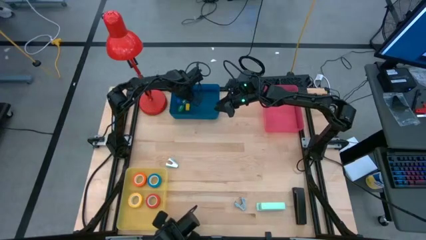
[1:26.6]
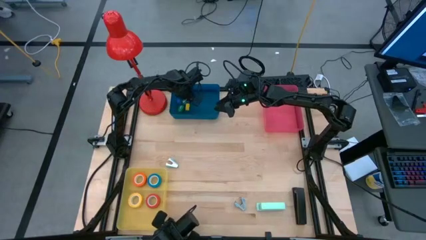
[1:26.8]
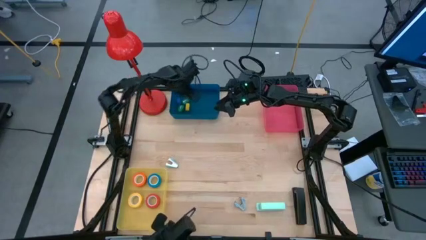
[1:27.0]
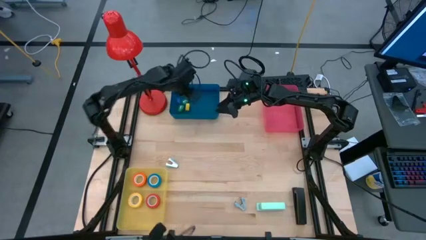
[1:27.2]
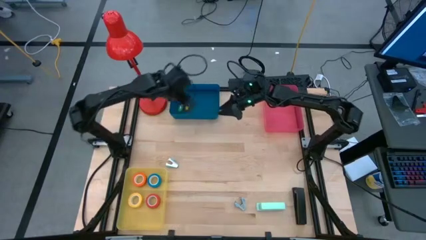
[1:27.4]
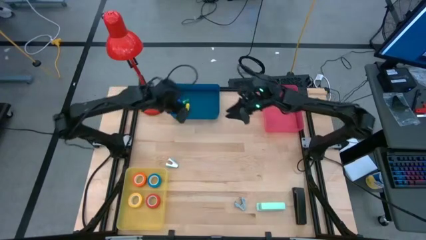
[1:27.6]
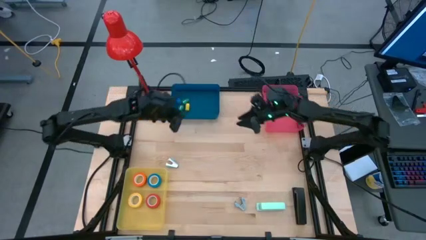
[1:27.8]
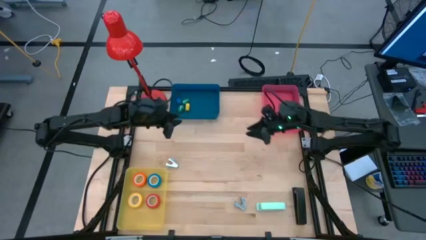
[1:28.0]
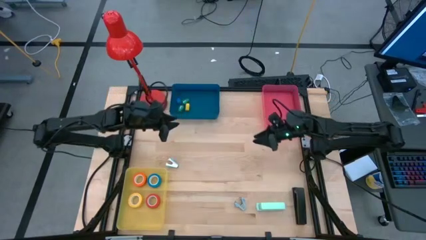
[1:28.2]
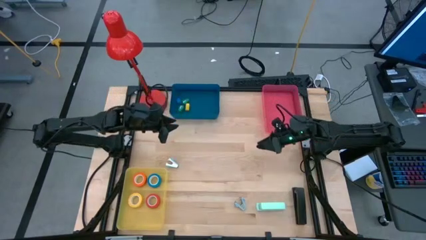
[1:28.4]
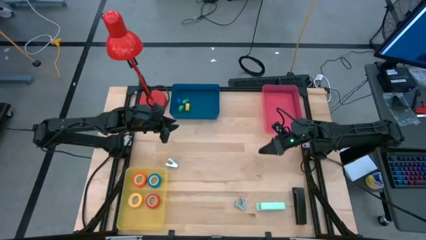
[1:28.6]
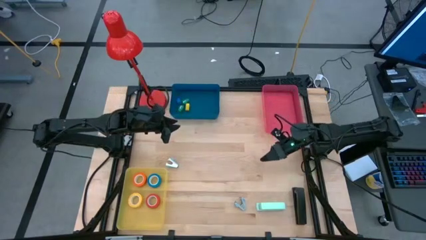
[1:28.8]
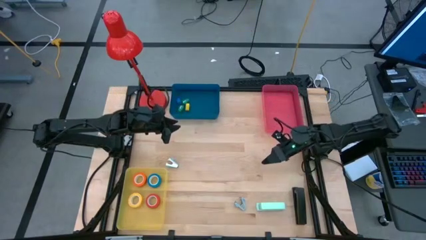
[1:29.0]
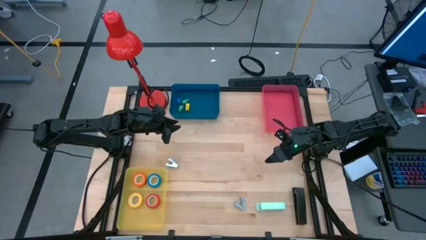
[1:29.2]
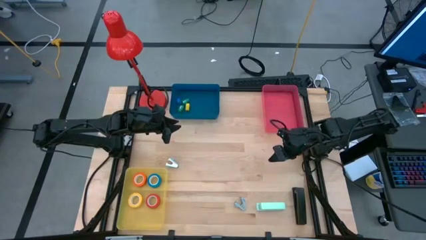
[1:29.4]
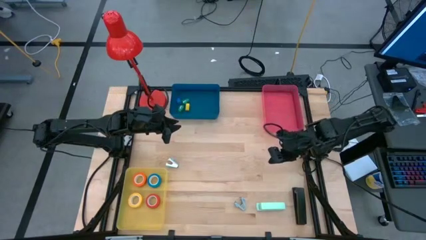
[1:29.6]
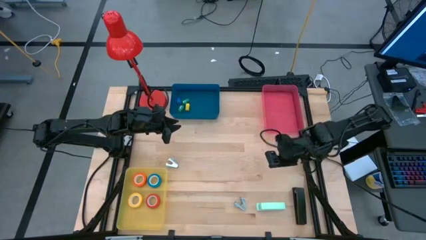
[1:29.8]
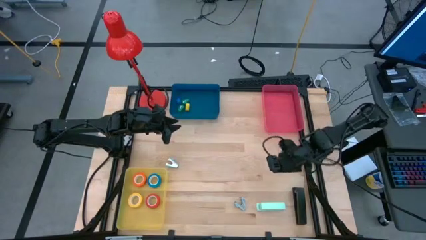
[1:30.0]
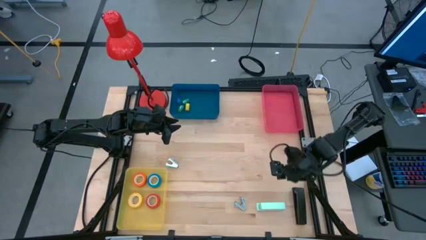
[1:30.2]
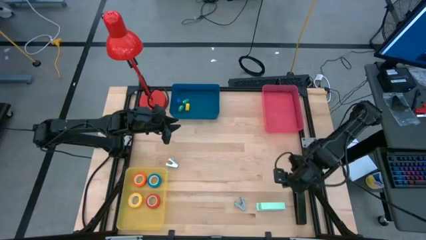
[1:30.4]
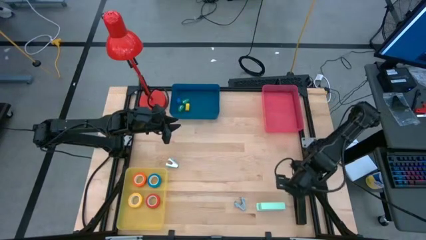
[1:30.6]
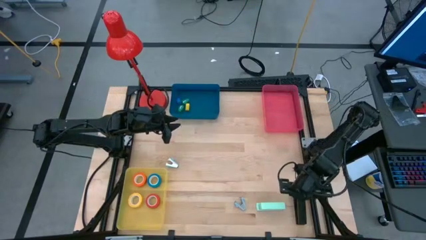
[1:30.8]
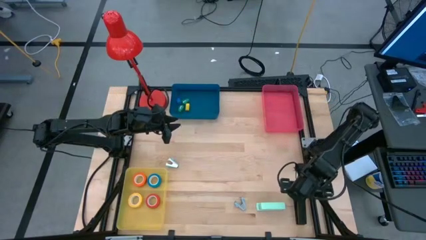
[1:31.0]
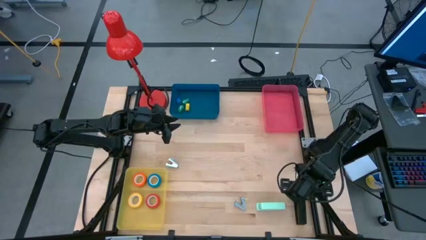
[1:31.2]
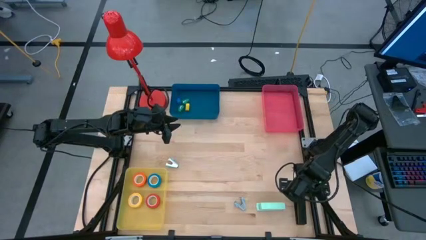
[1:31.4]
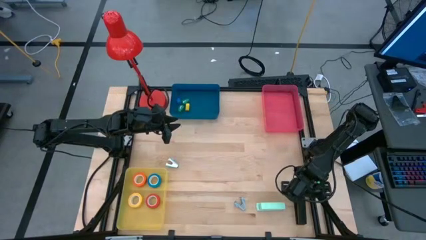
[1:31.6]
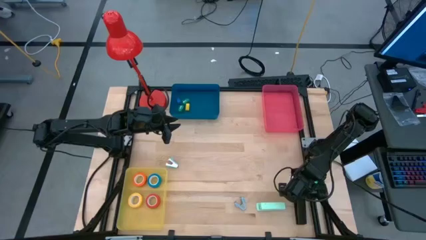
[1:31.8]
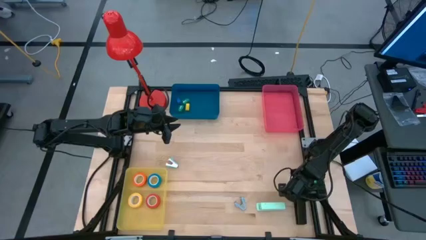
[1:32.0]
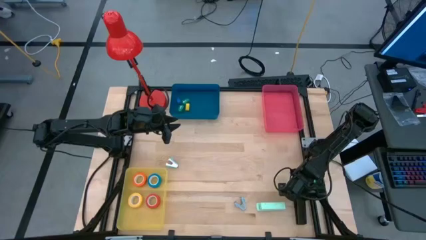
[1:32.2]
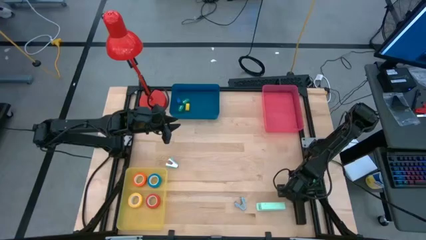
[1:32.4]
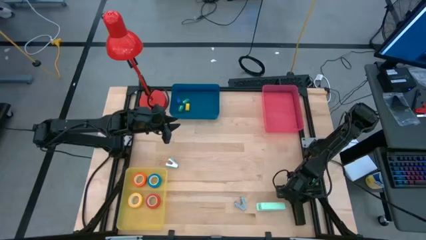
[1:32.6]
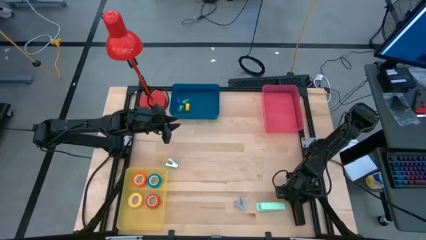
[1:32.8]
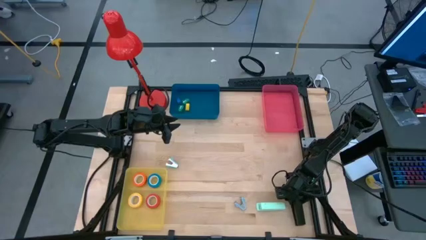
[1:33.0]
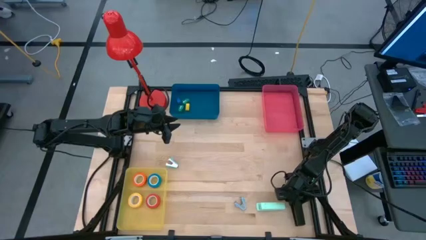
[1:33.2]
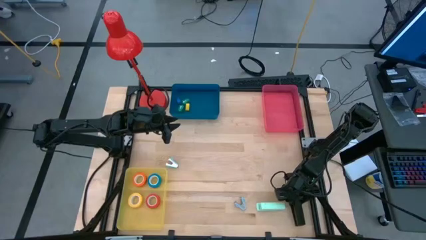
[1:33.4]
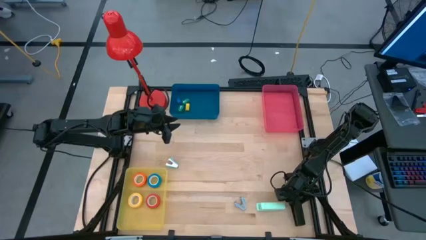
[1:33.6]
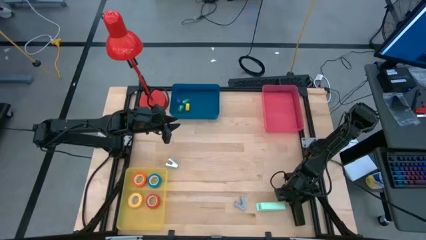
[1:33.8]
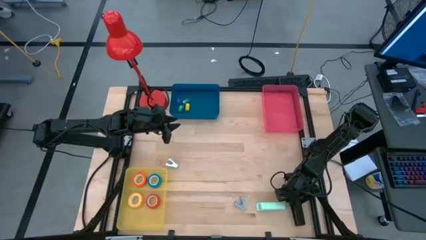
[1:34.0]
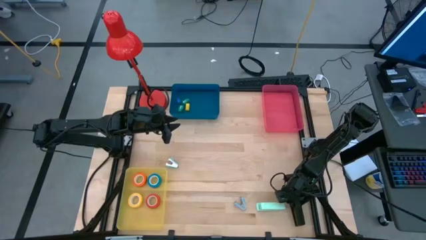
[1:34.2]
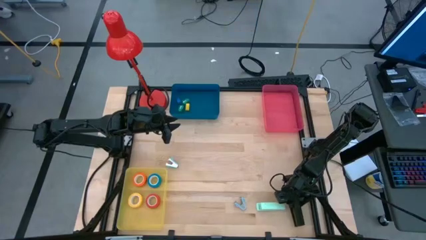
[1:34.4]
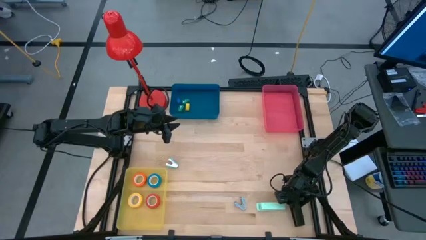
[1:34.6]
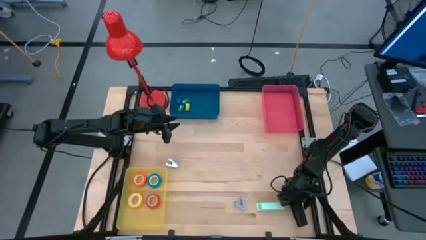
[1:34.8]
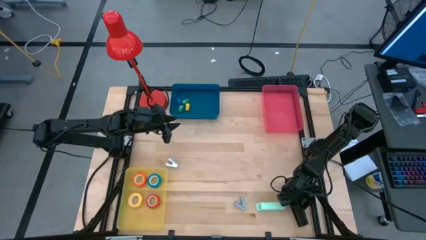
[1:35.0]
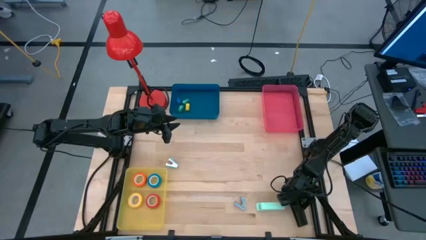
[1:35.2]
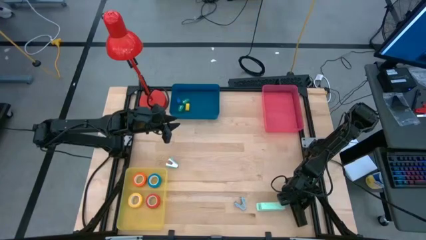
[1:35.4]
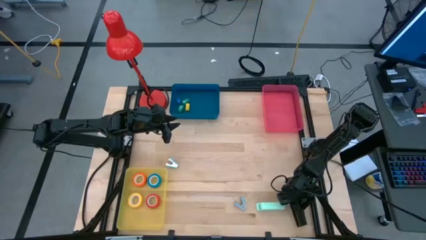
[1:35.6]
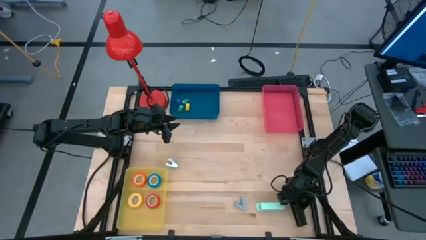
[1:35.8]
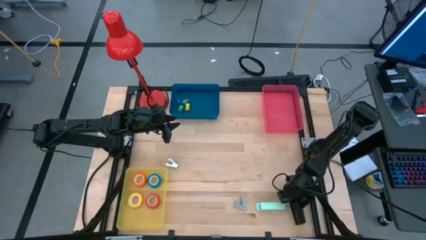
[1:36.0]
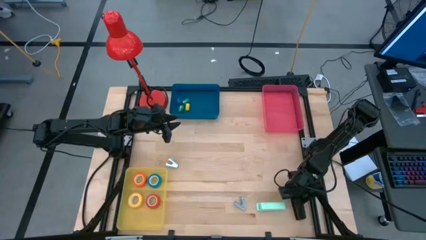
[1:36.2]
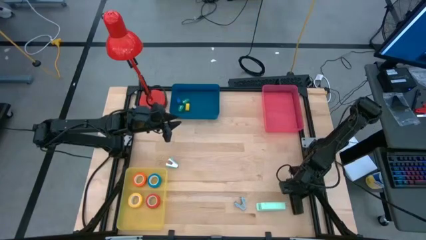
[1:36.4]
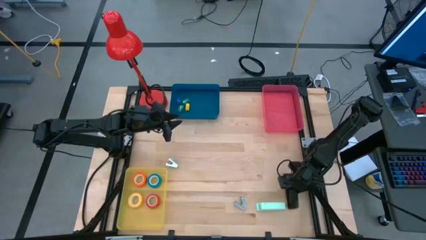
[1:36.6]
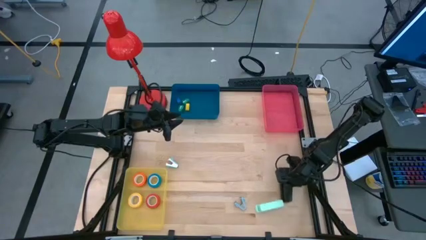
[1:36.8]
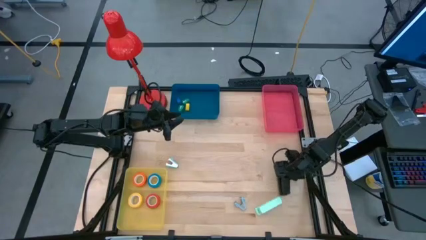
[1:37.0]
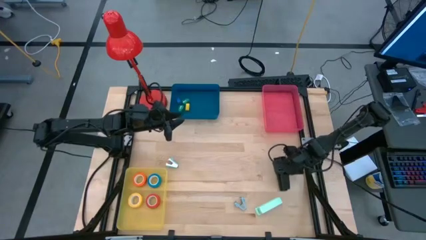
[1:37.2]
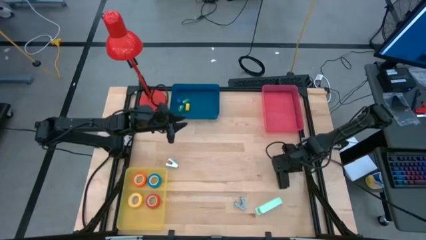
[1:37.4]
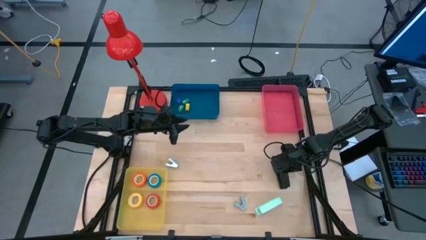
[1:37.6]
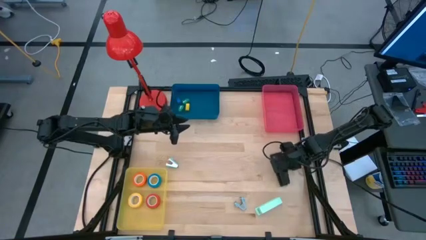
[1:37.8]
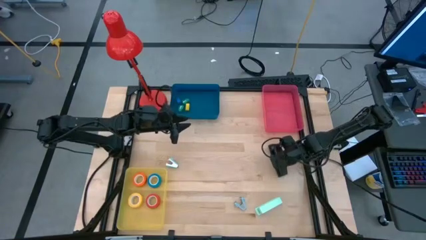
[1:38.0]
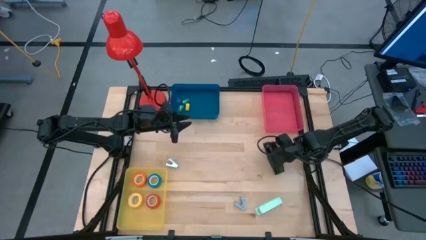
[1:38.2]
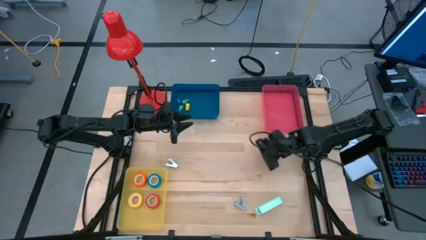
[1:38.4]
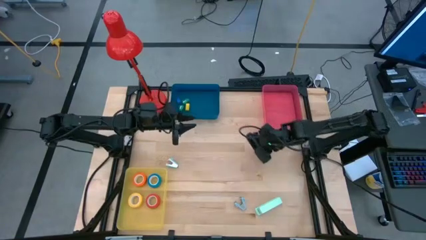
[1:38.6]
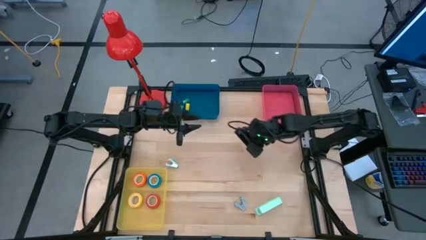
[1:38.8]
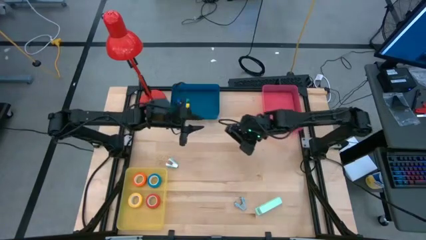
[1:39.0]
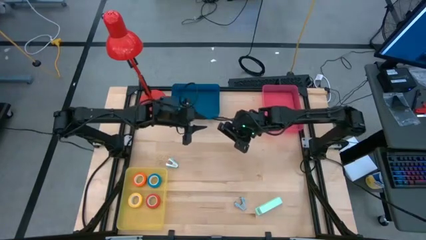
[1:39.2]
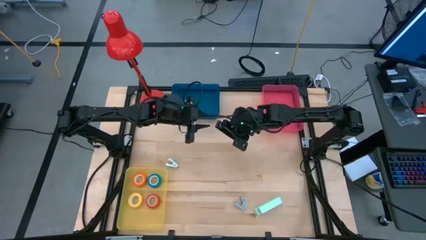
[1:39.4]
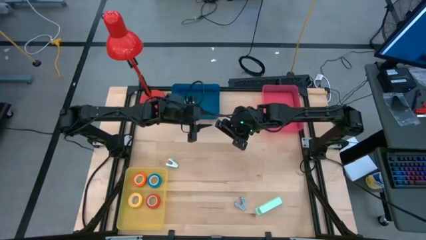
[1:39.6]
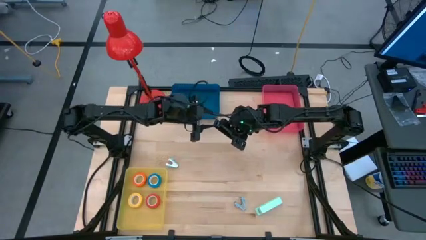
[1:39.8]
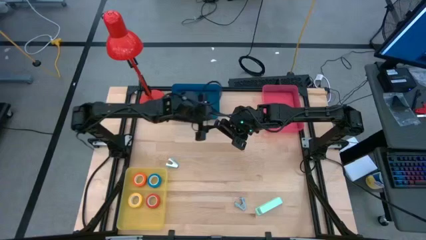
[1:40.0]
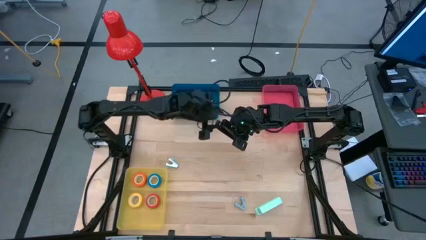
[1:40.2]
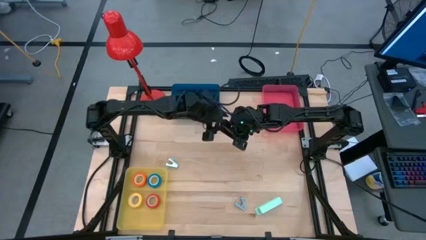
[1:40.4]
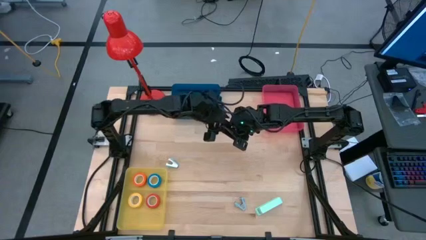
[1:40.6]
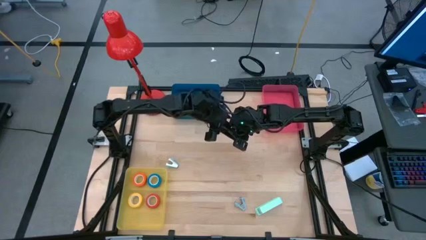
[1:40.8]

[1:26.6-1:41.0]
Task: Pick and place Stapler, Stapler remover, tape
Put the black stapler into the blue bin

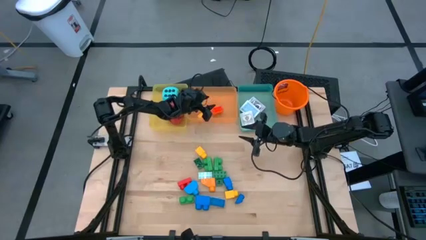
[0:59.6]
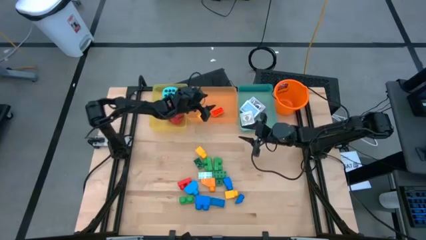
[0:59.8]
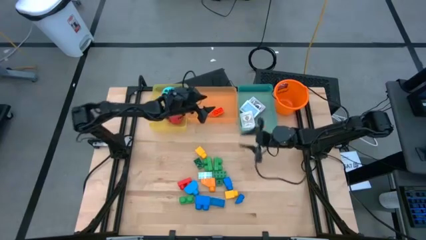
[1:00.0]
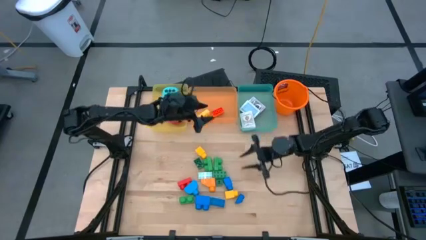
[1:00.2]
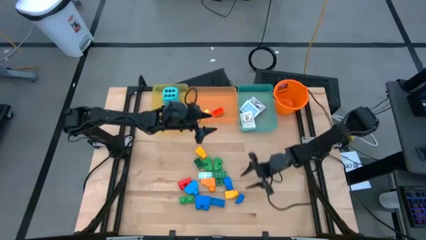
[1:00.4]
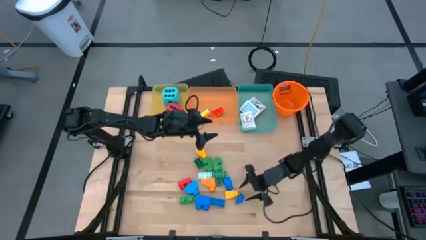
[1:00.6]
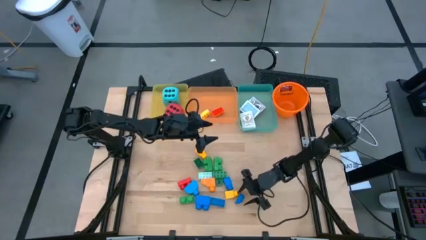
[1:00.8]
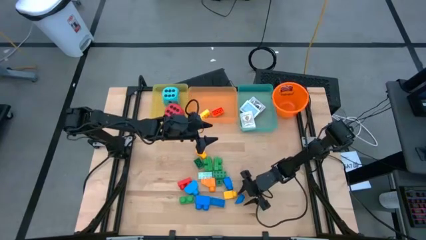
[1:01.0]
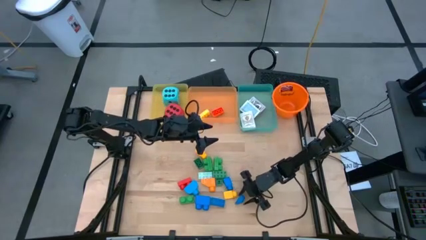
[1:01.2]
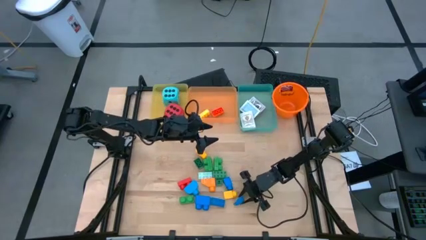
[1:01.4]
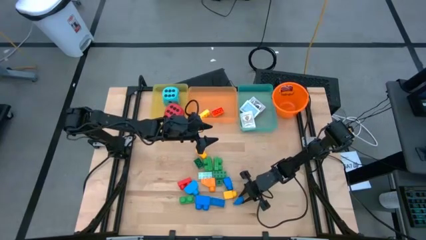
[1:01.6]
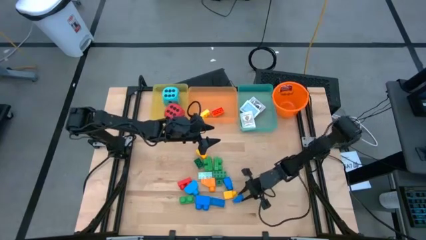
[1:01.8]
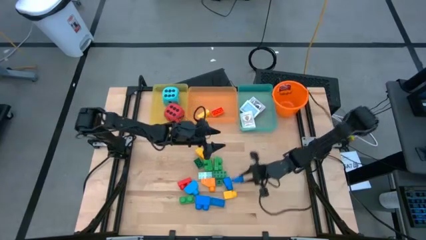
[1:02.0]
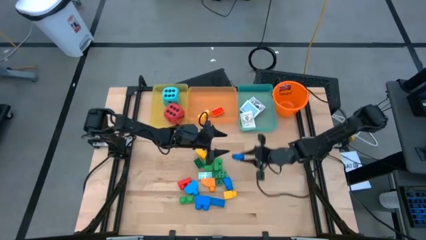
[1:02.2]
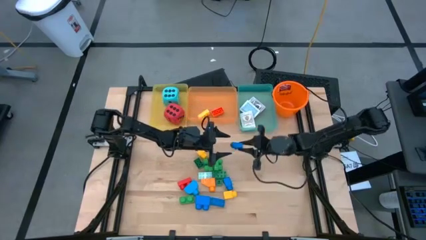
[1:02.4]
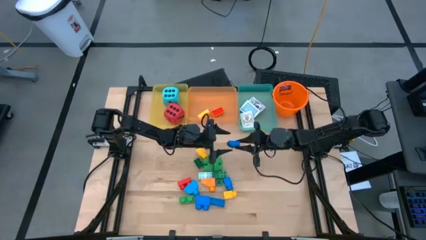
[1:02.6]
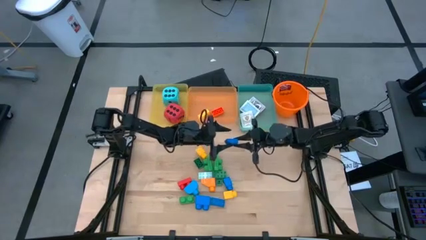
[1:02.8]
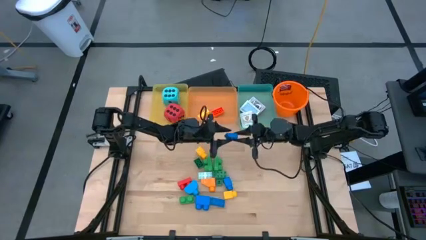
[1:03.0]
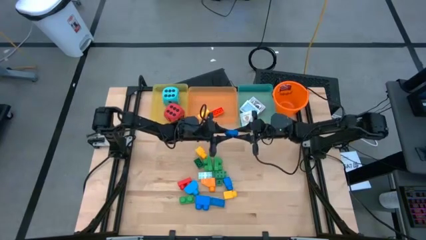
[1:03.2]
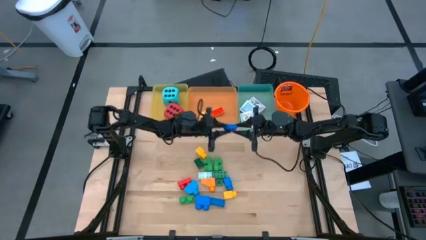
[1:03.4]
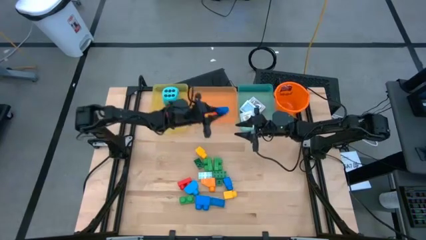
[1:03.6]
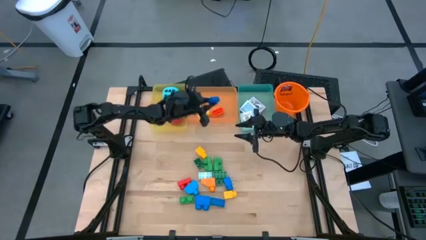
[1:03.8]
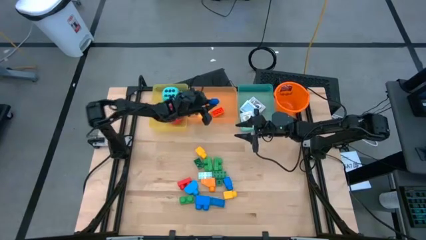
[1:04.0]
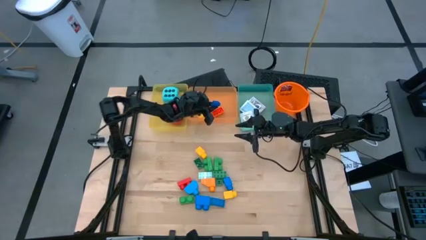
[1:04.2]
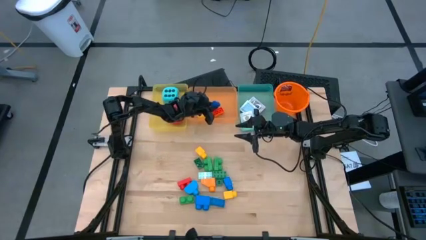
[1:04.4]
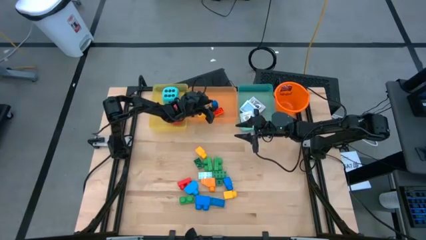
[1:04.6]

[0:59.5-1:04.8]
Task: Pick & Place Toys
Put the blue game piece into the orange bin
